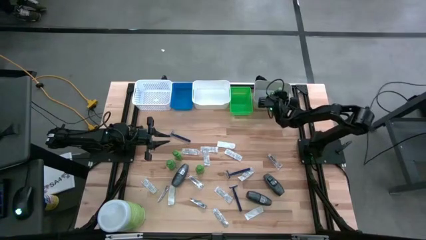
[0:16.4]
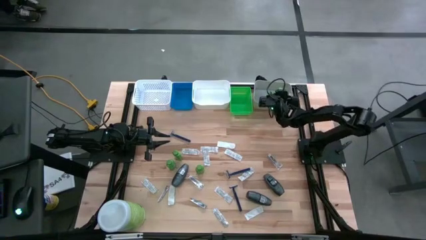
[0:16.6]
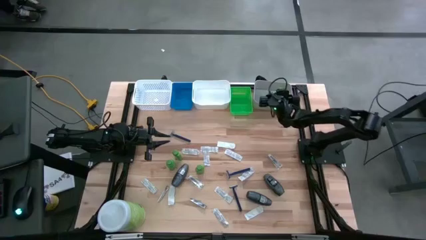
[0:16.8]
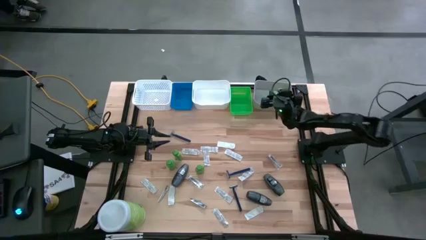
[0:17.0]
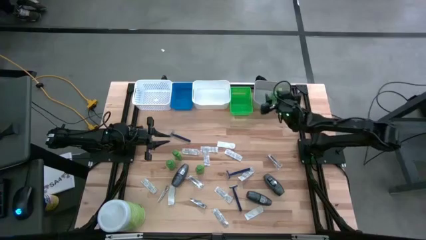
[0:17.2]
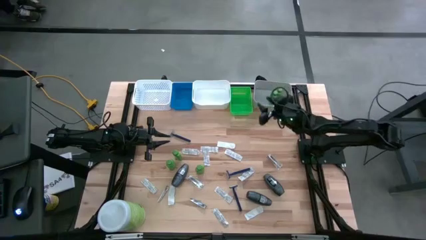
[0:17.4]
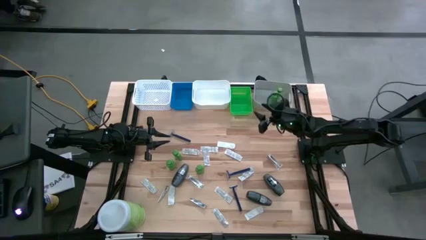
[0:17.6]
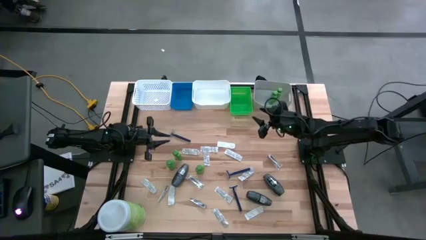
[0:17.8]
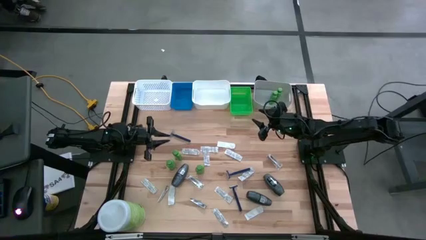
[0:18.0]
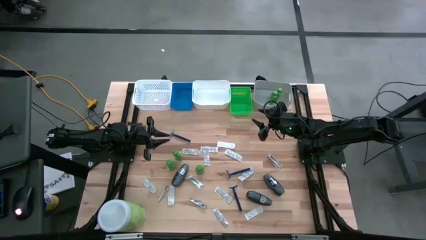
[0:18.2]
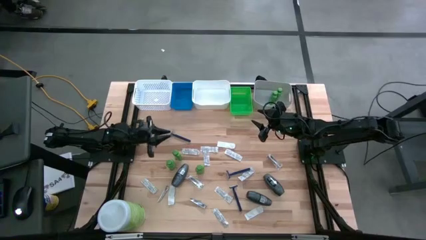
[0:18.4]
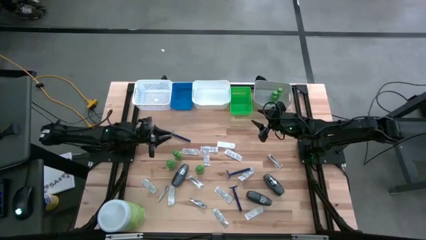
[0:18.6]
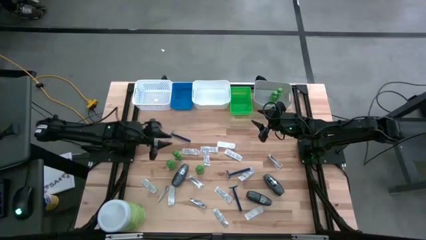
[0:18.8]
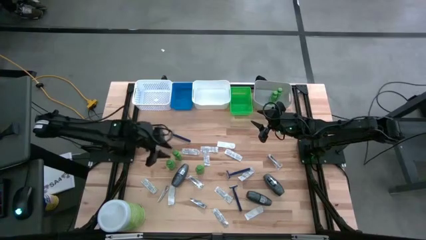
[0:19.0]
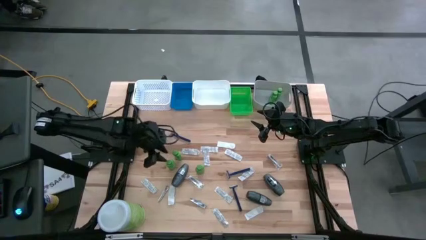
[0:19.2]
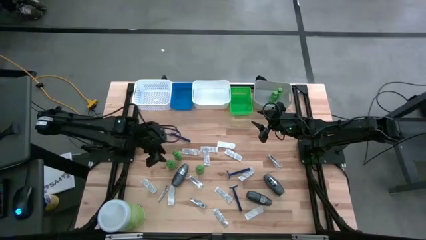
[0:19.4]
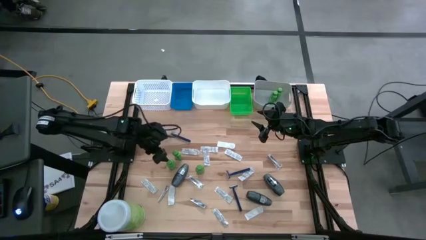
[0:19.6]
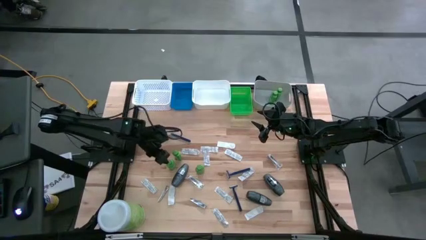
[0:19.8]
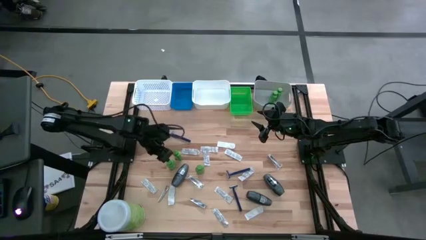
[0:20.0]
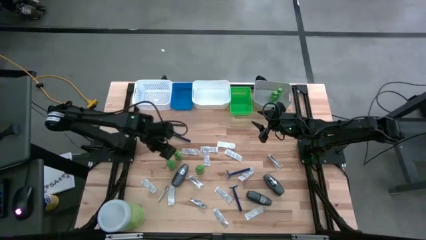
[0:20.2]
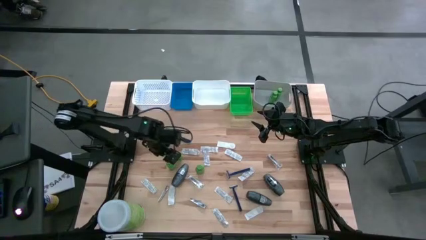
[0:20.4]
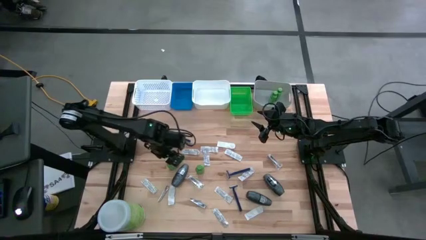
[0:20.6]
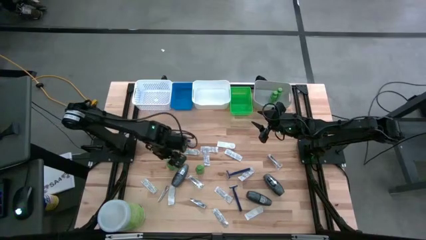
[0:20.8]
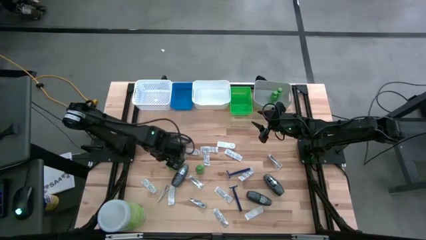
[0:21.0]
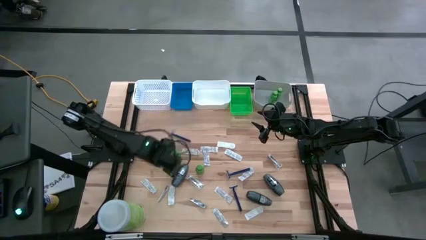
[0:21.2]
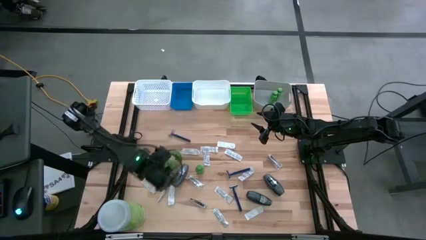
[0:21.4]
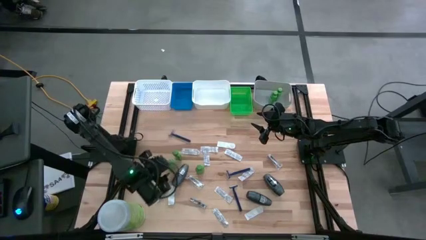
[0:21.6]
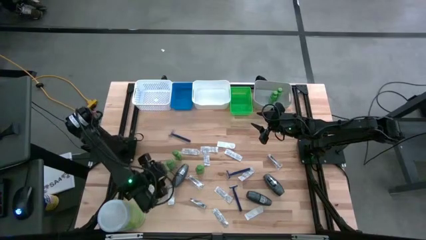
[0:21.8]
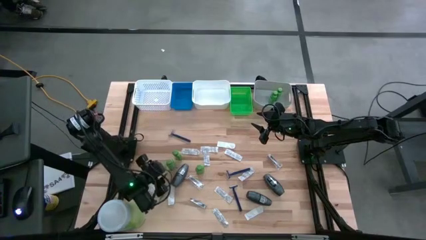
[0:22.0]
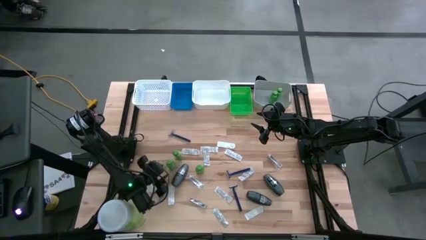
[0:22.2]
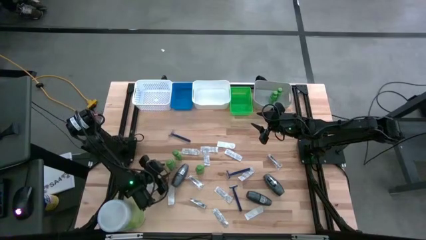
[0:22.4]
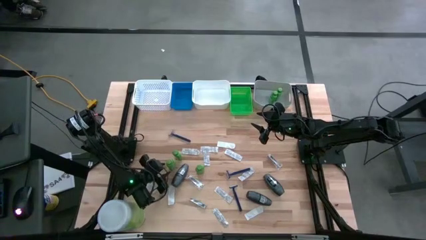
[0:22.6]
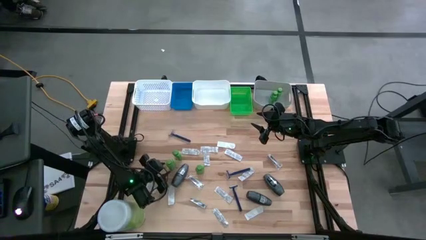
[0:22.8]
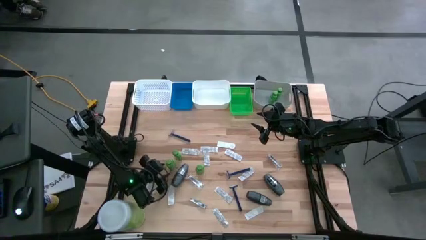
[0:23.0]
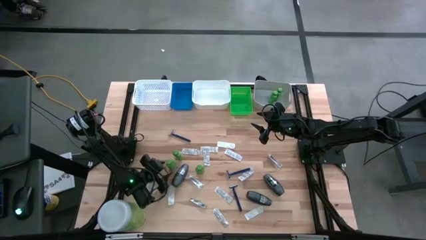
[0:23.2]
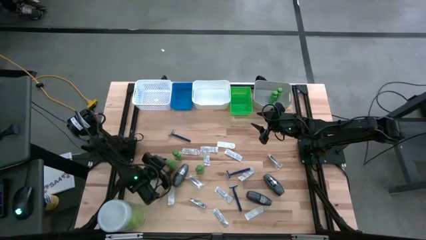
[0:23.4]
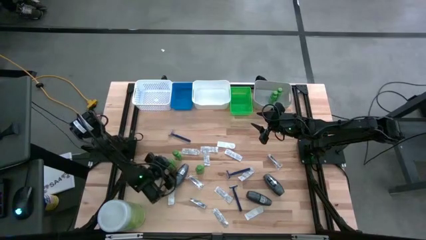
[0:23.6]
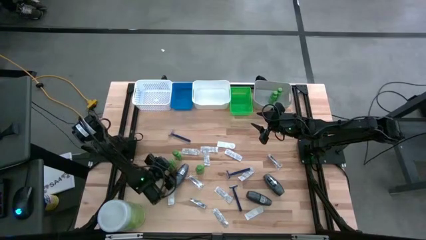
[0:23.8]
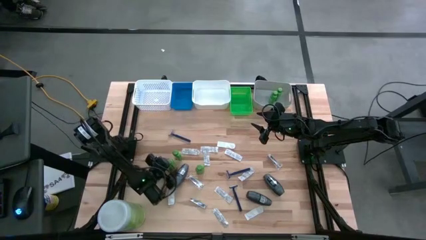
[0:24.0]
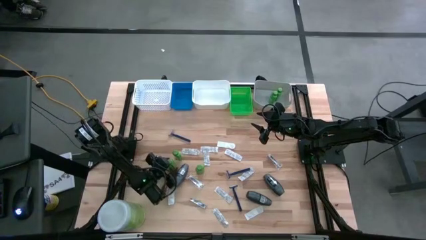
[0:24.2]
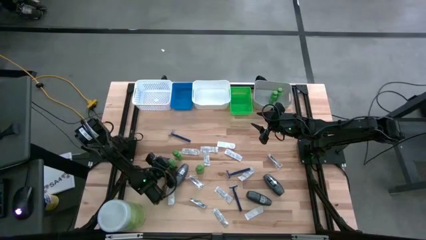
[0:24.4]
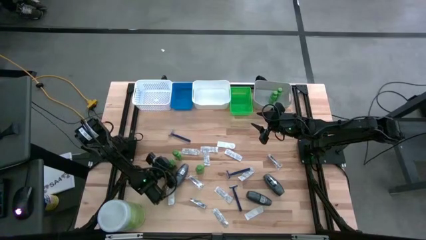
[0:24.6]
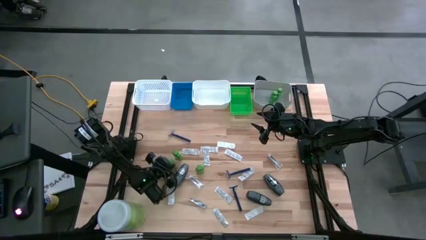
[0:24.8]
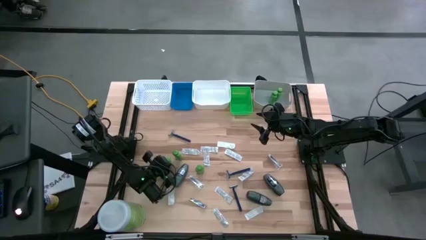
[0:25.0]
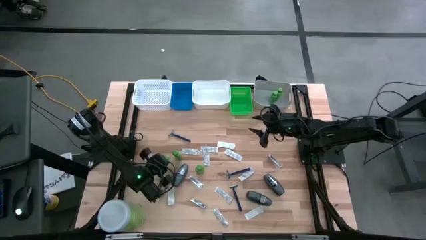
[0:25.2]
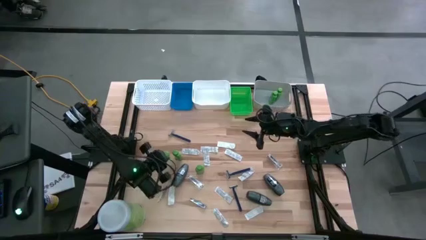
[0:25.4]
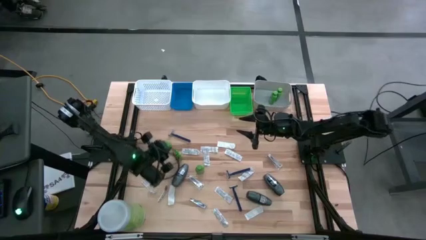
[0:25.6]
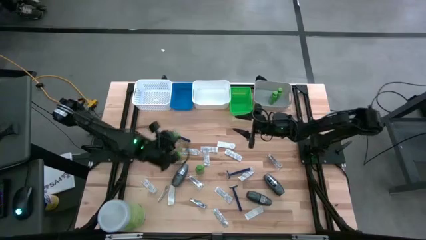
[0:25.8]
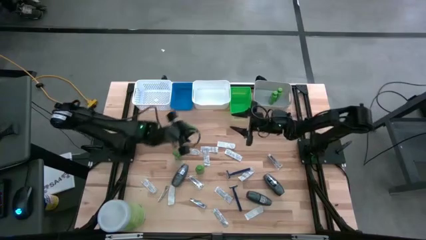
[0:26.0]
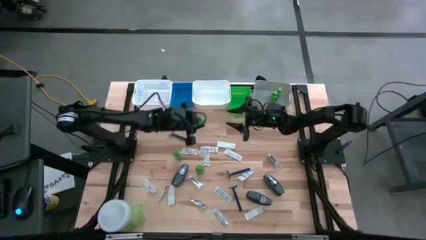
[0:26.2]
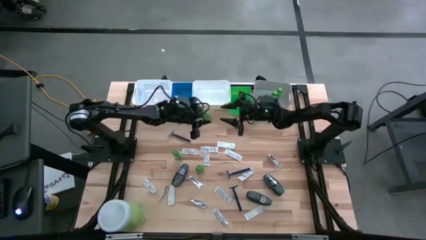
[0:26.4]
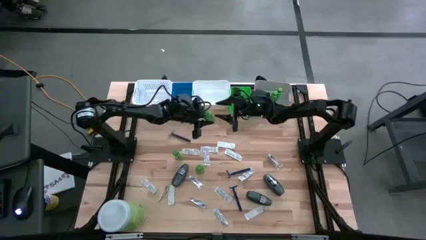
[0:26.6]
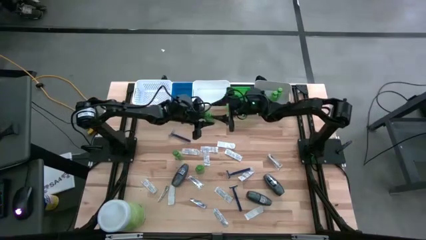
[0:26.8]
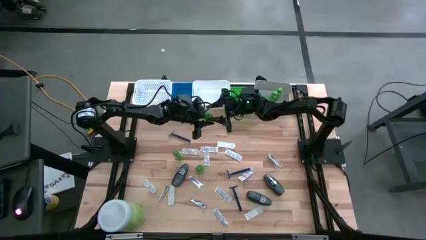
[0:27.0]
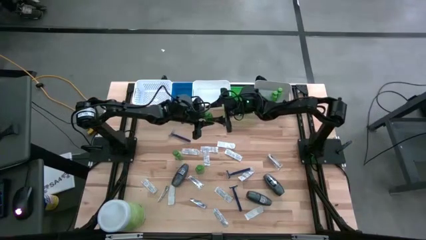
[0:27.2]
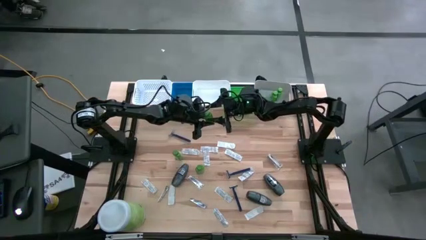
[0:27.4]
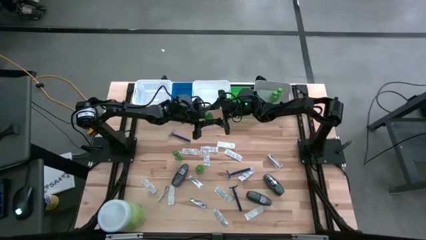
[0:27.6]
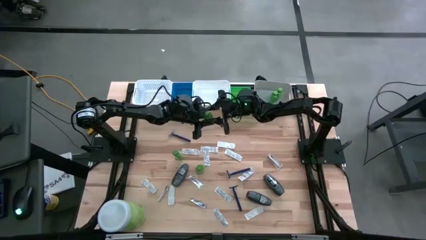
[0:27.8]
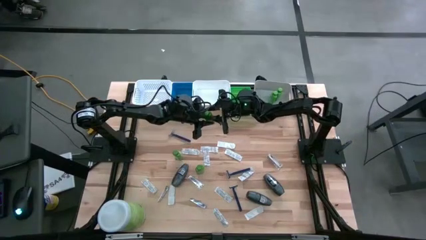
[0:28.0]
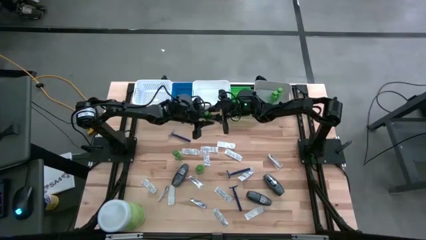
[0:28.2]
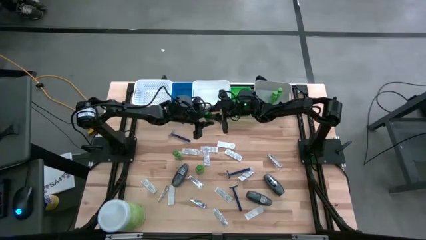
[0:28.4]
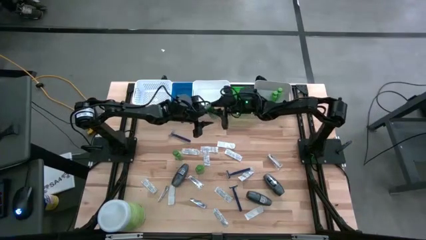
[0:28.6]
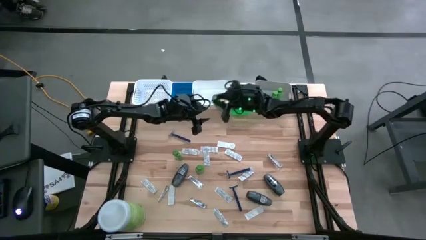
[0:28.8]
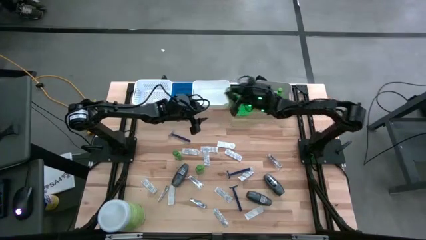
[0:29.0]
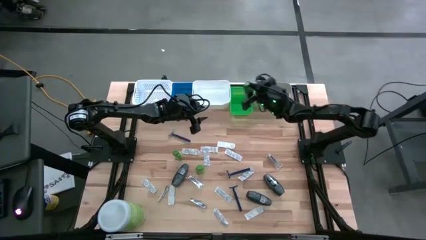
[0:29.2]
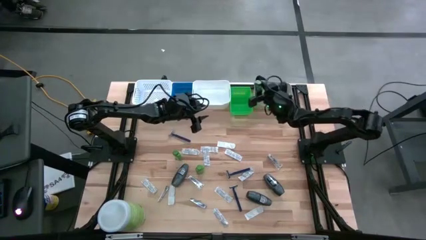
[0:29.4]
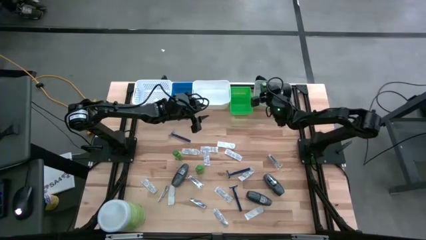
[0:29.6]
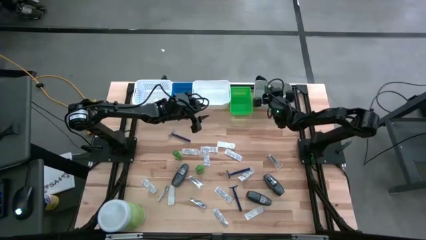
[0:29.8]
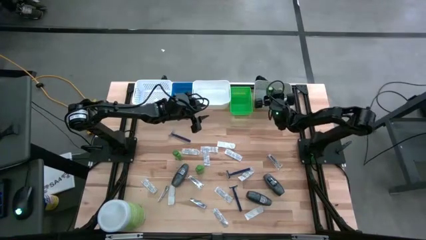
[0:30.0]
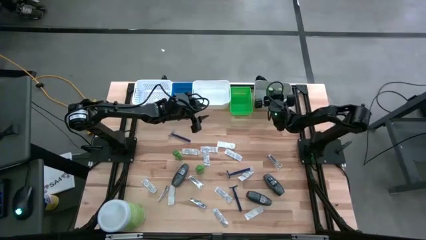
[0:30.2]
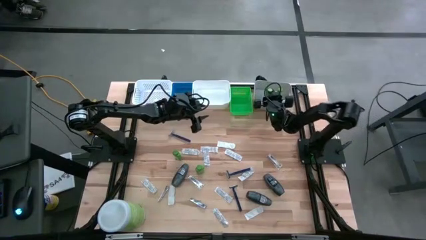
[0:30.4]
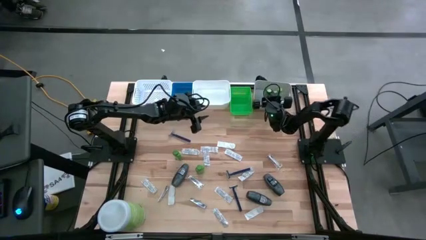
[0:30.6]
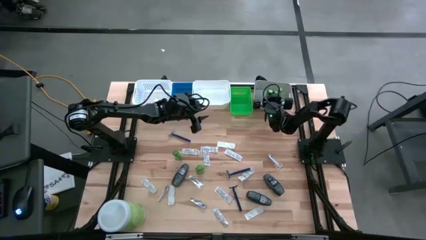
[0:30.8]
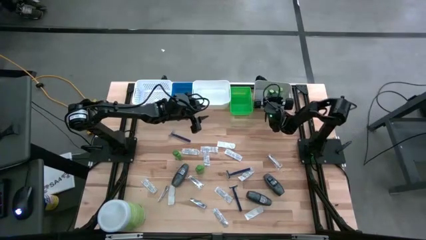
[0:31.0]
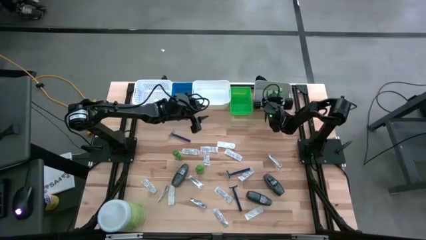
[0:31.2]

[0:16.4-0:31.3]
Task: Pick & Place Travel size toiletries
Put the shampoo into the gray bin
